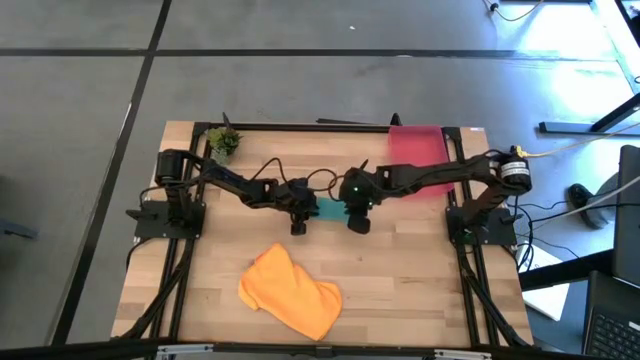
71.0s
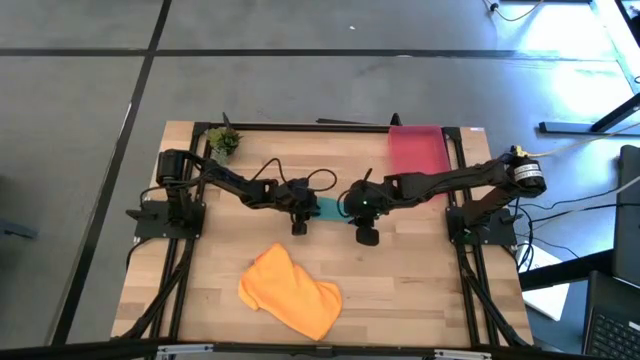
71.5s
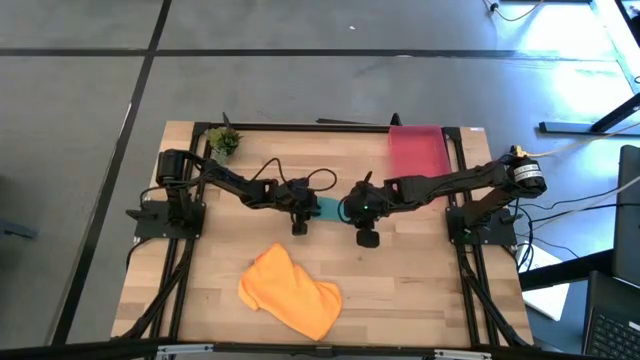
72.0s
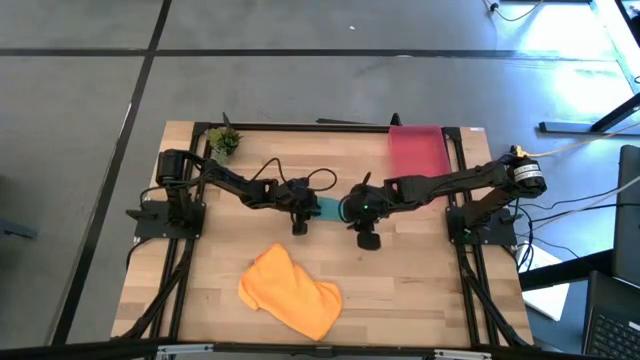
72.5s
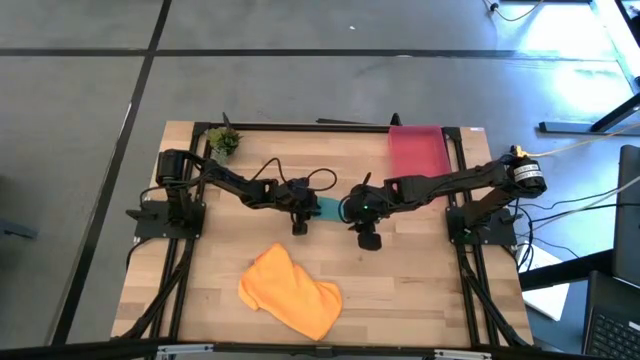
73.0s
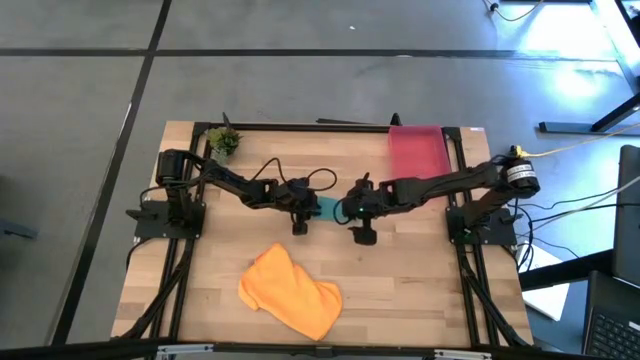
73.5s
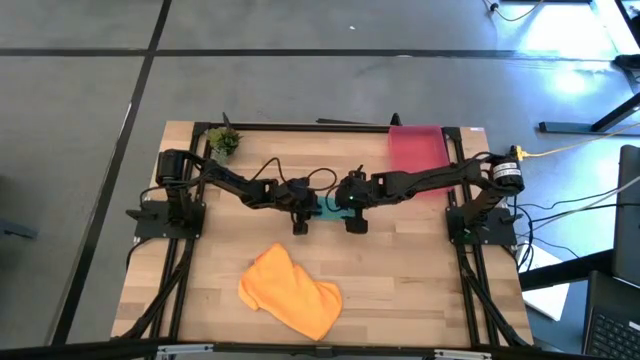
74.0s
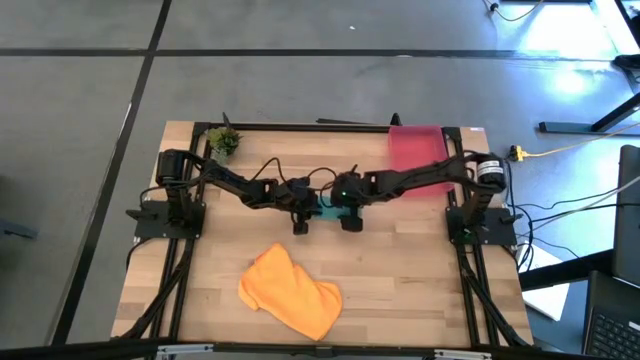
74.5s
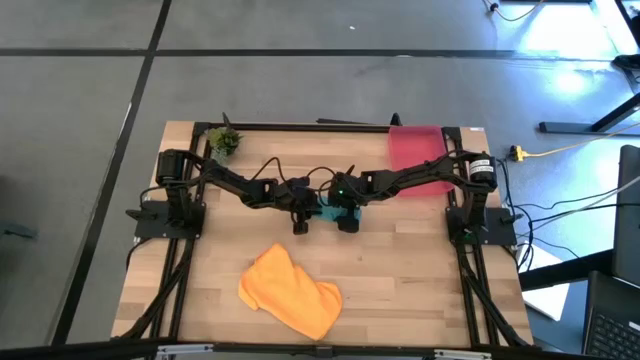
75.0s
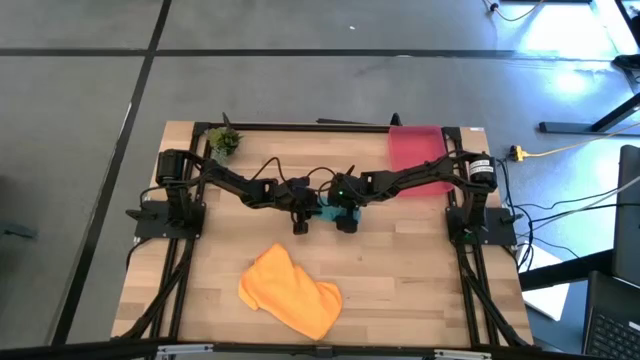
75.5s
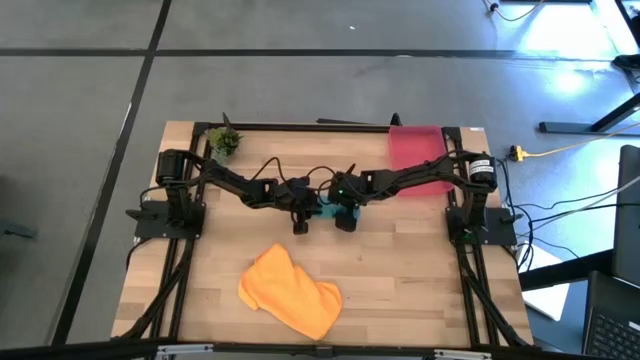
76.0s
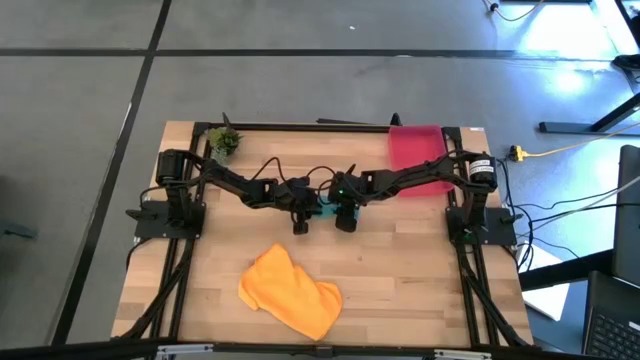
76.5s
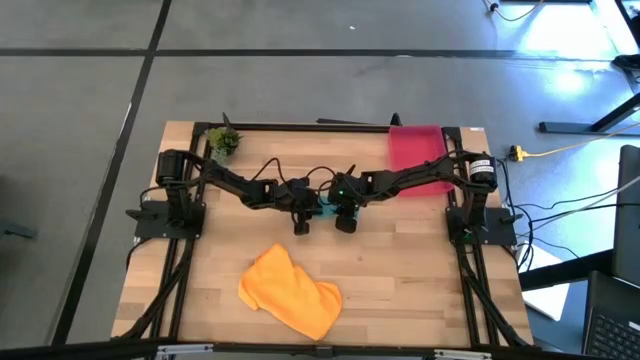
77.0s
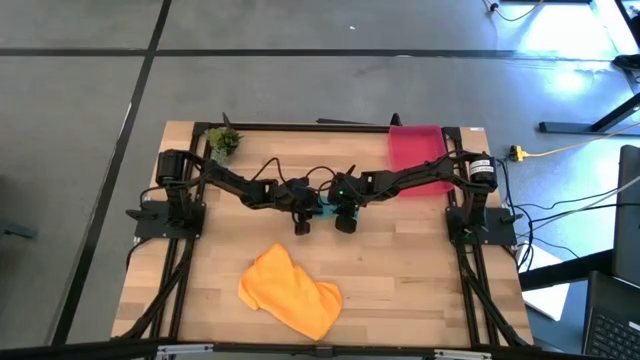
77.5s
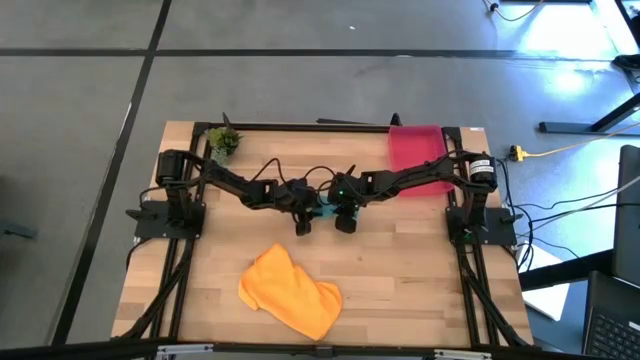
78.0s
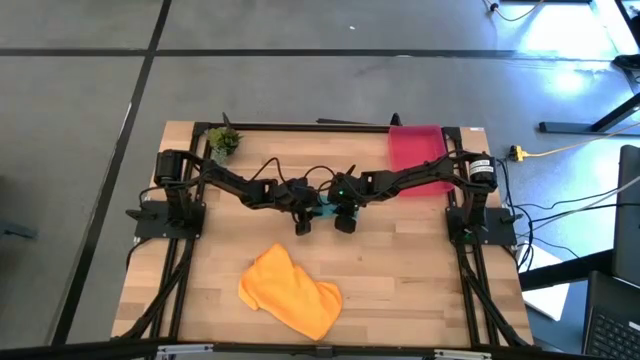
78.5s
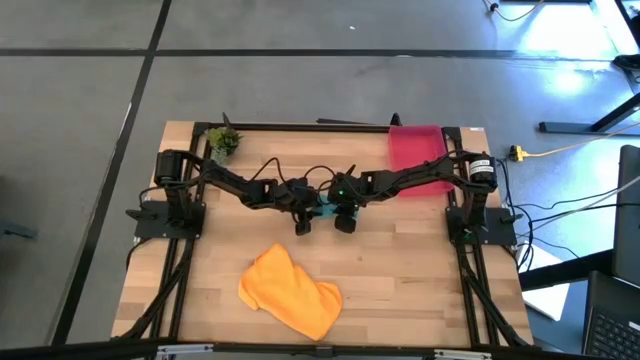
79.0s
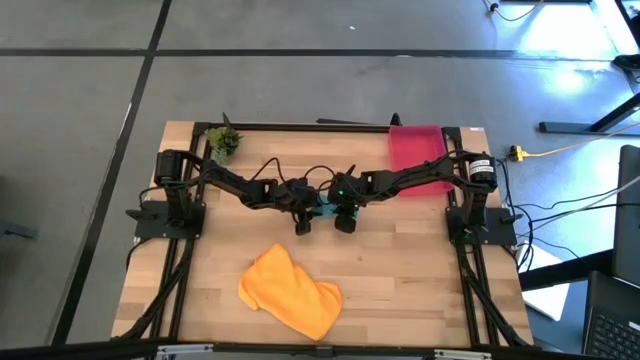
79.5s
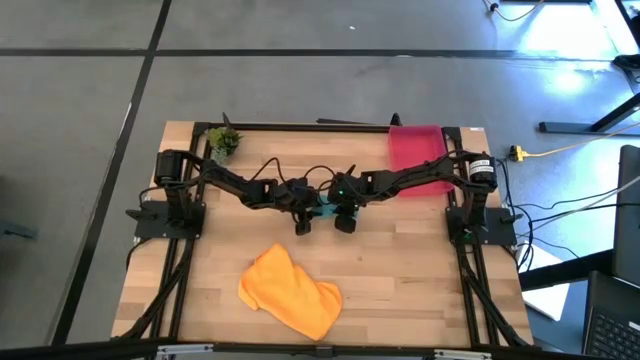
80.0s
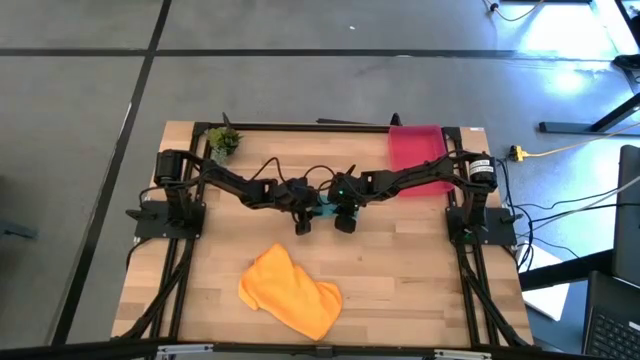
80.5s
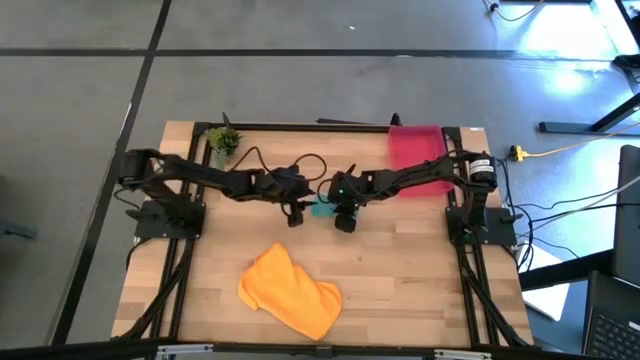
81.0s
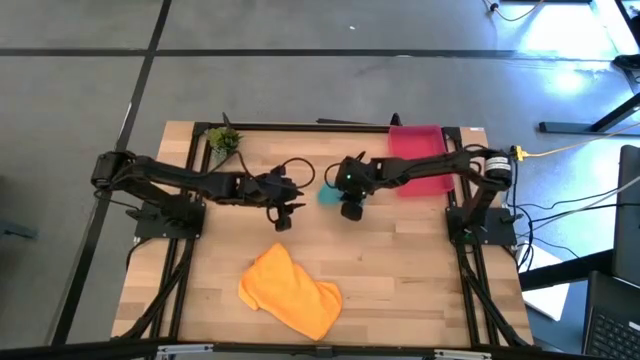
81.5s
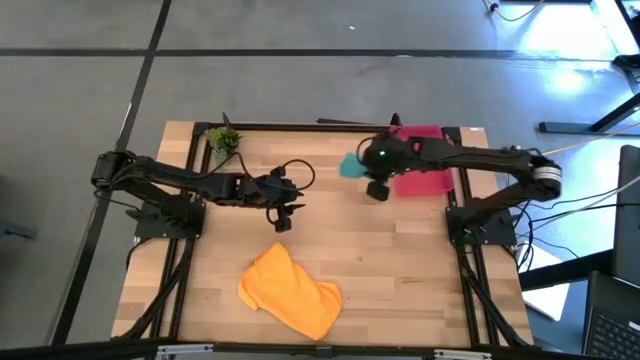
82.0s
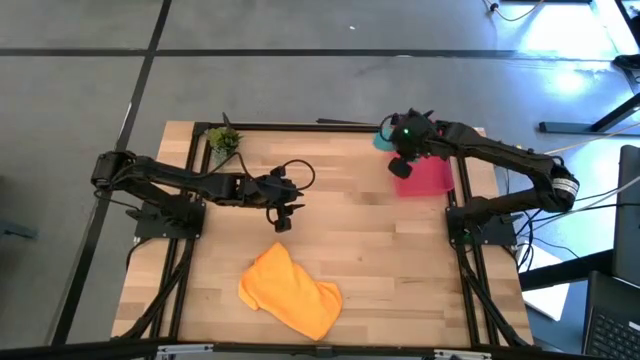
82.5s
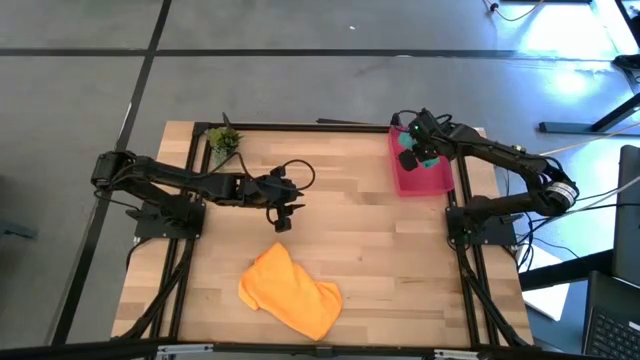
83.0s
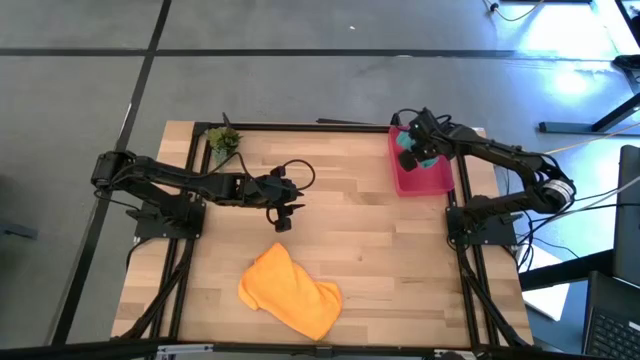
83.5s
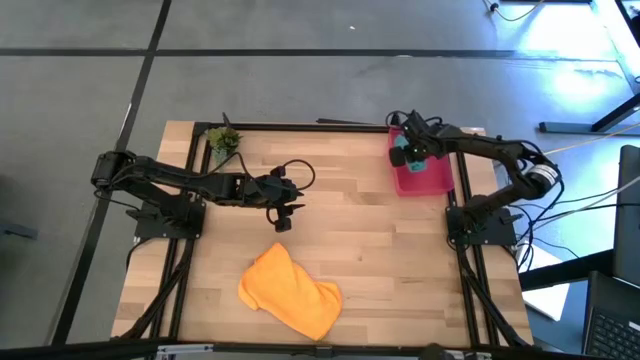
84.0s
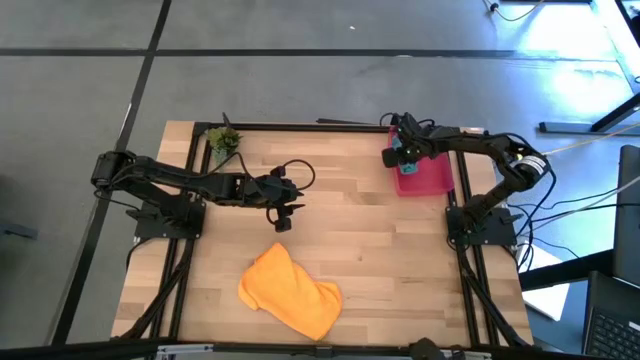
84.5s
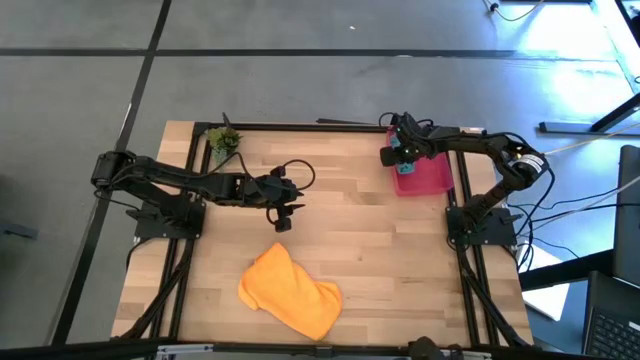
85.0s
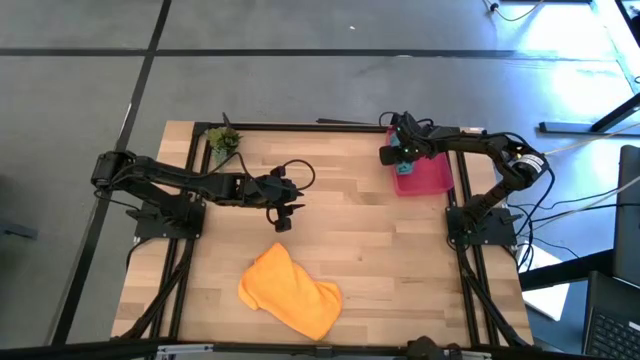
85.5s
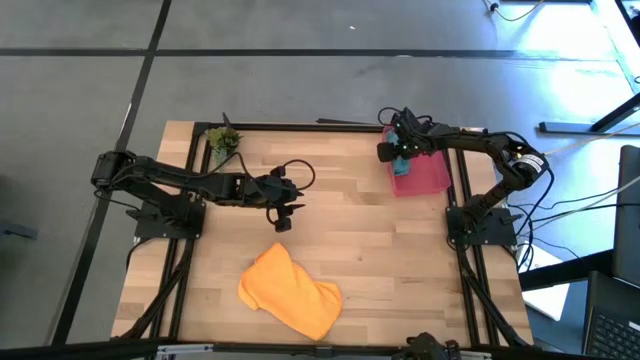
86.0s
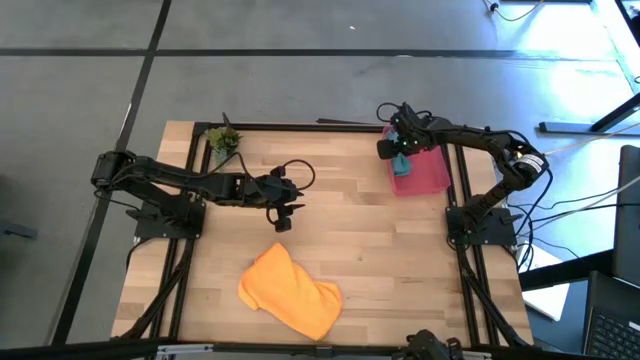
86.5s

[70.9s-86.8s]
Task: Roll microfiber towels into tight, uniform cylinder then place into a basket
Put the blue microfiber cloth into the pink bin

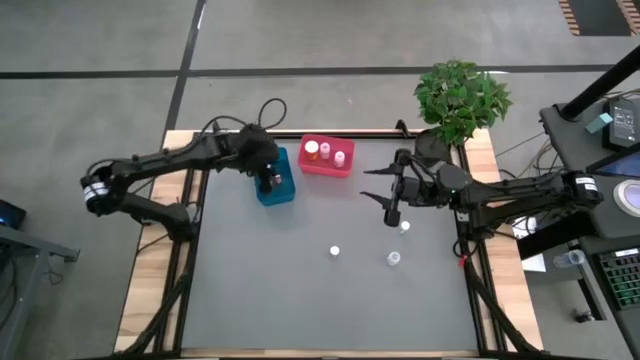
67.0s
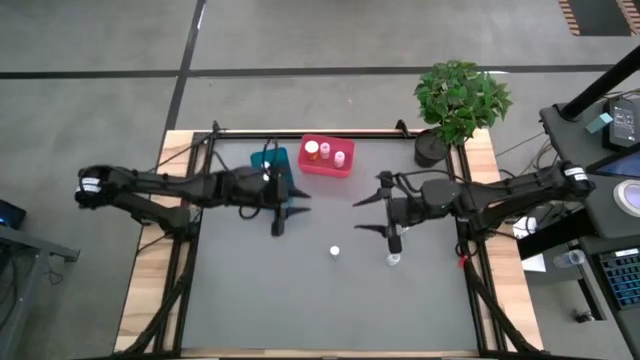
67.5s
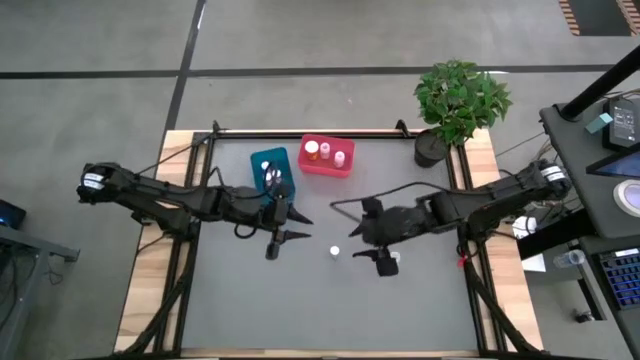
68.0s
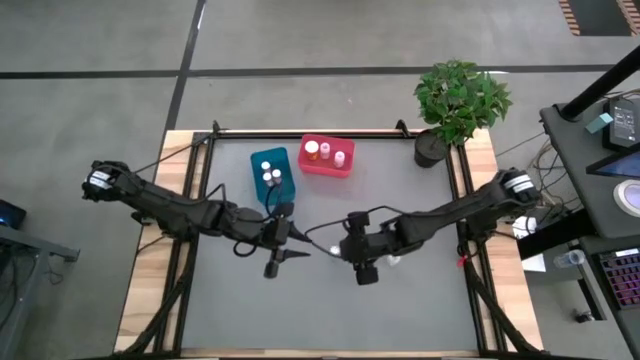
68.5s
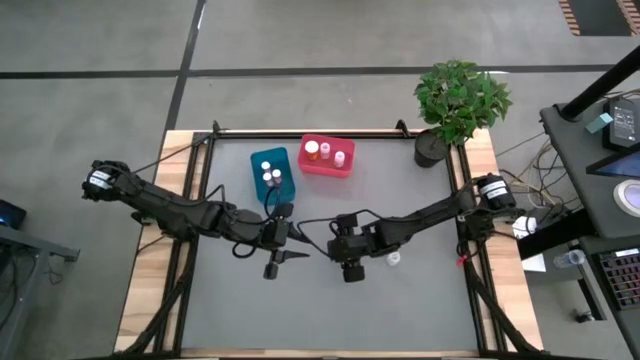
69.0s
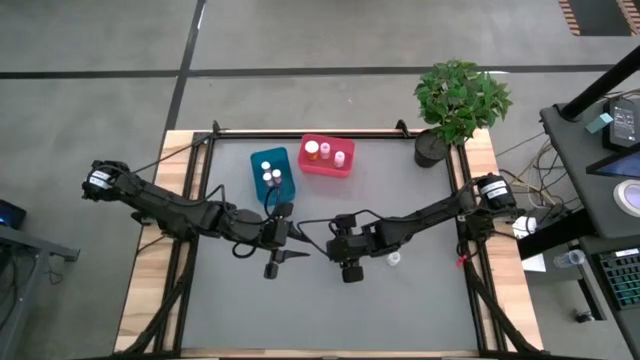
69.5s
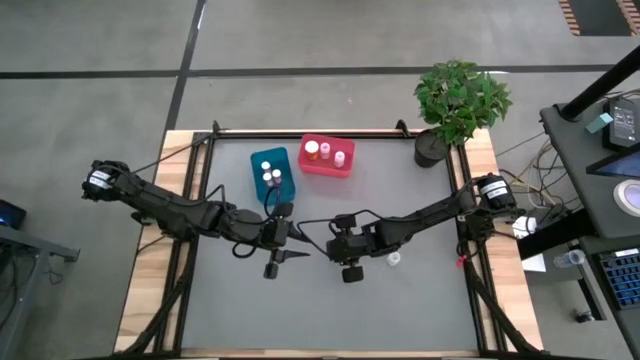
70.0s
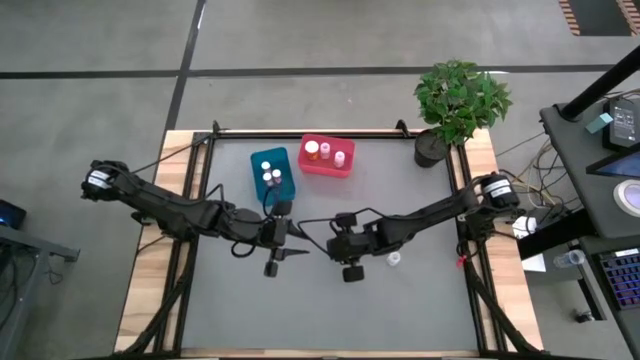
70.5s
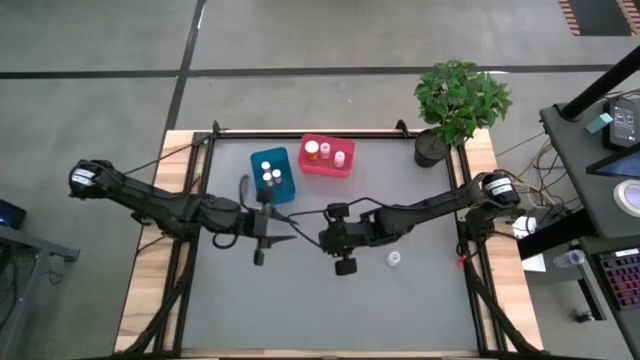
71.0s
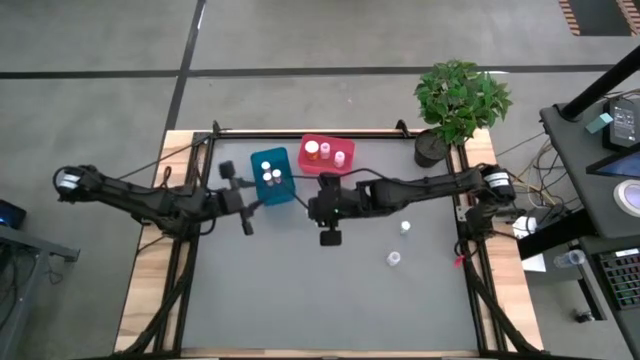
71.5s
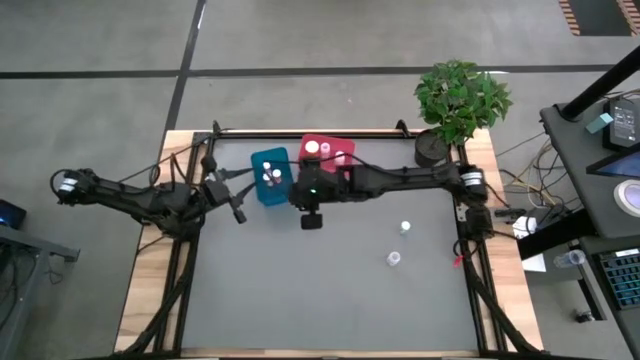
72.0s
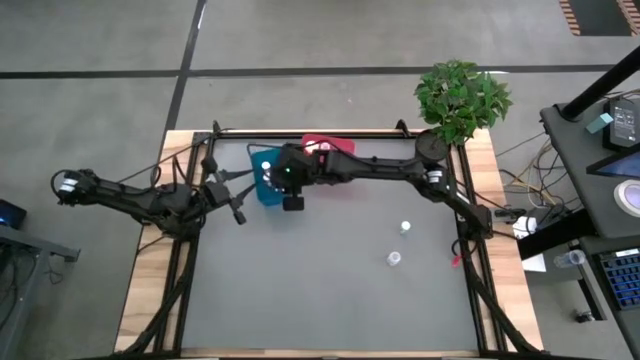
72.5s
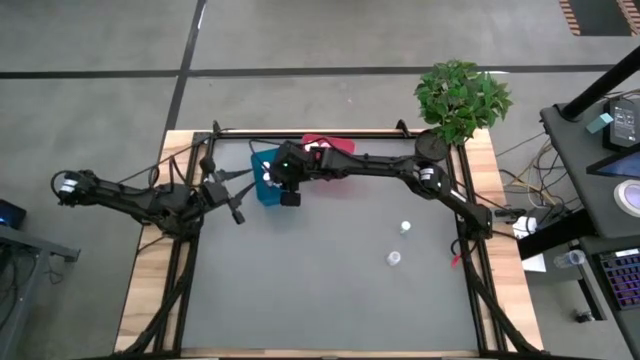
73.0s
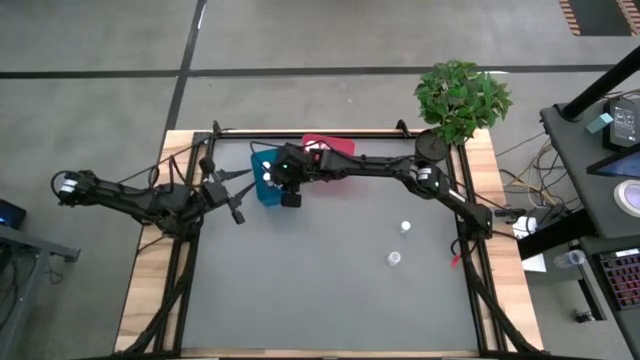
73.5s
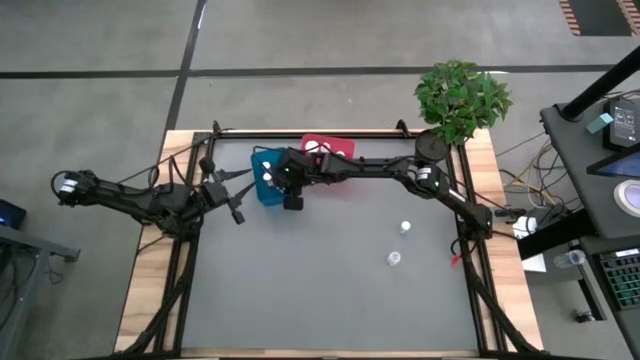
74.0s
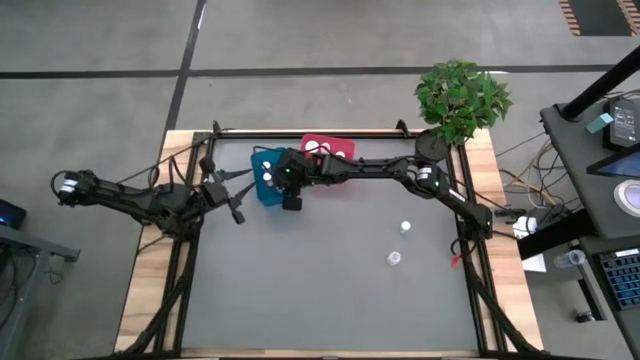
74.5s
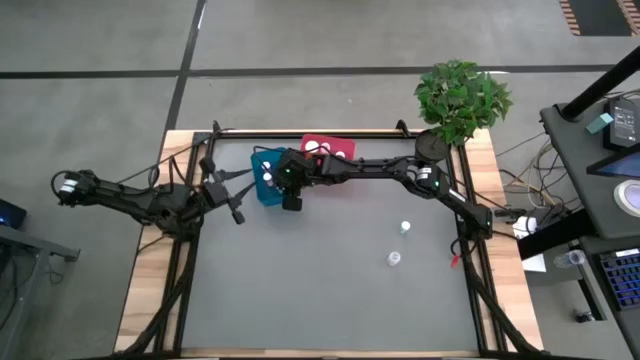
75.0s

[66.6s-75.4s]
Task: Pick and place medicine bottles into bin by pill shape (circle, oval)
Put the bottom blue tablet bottle into the blue bin
